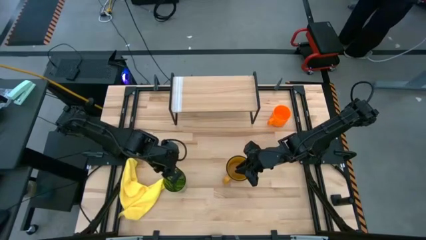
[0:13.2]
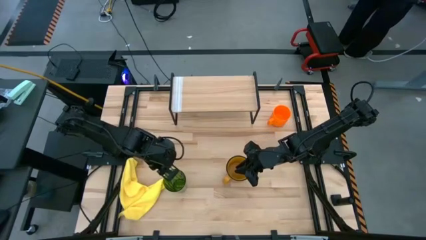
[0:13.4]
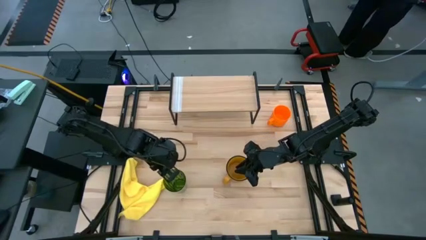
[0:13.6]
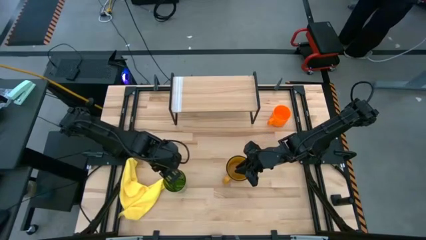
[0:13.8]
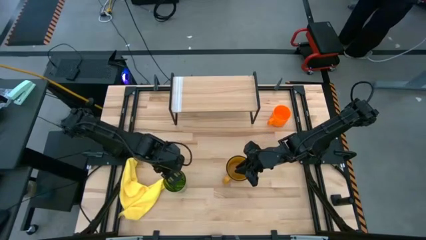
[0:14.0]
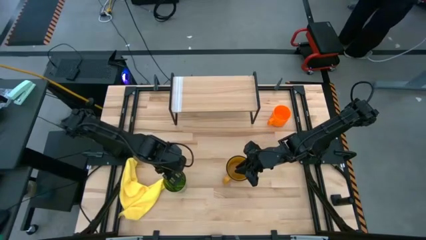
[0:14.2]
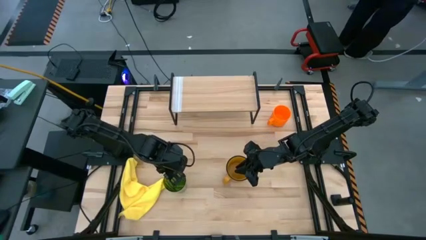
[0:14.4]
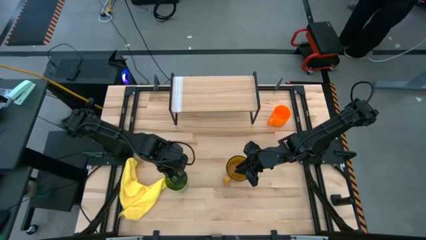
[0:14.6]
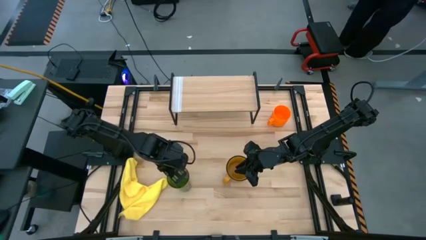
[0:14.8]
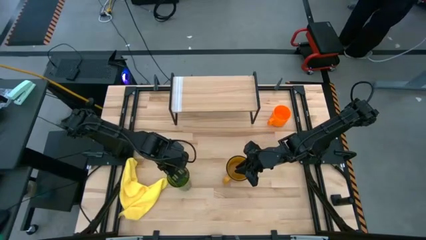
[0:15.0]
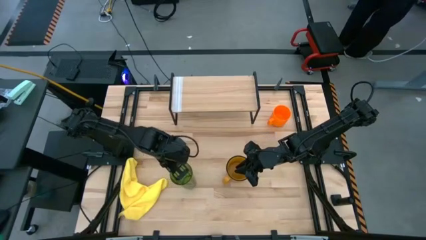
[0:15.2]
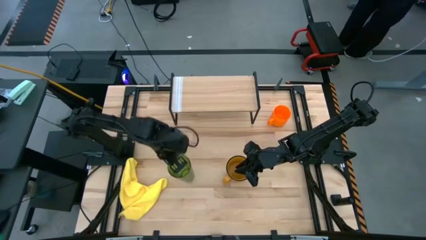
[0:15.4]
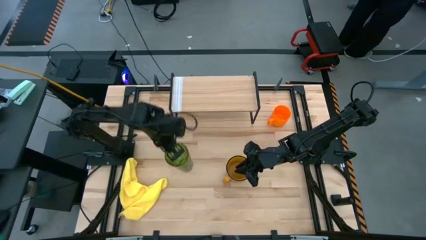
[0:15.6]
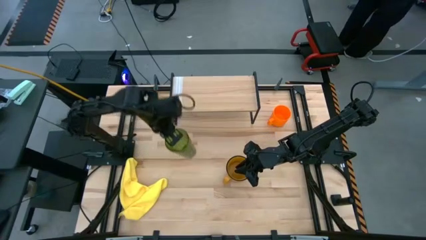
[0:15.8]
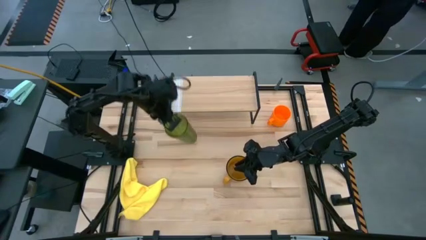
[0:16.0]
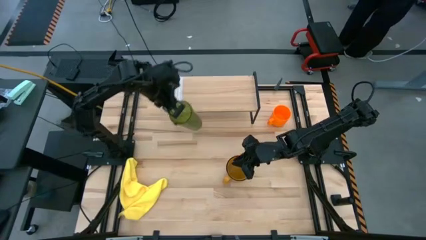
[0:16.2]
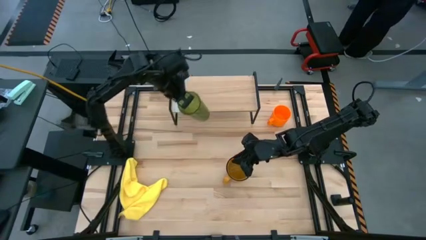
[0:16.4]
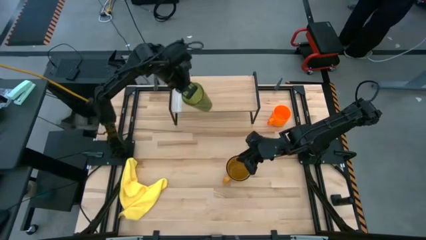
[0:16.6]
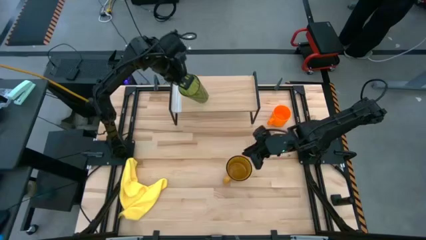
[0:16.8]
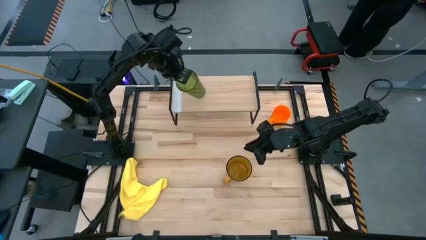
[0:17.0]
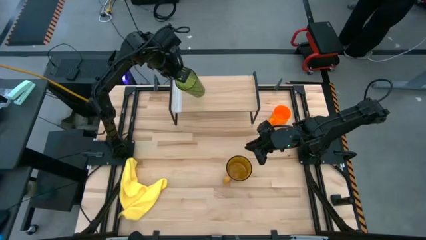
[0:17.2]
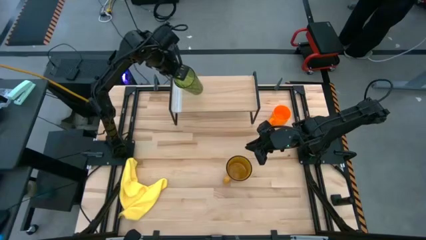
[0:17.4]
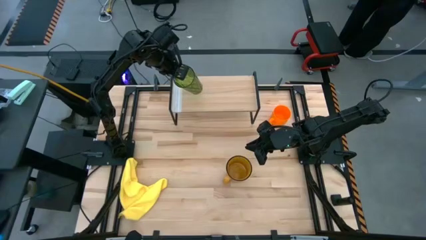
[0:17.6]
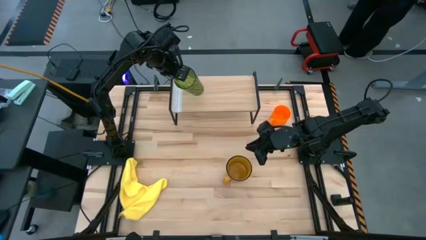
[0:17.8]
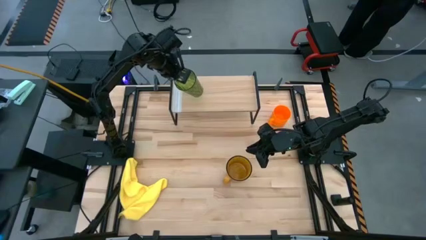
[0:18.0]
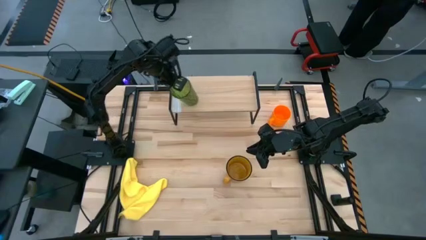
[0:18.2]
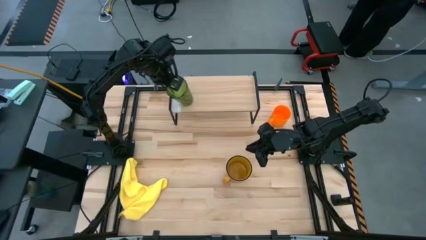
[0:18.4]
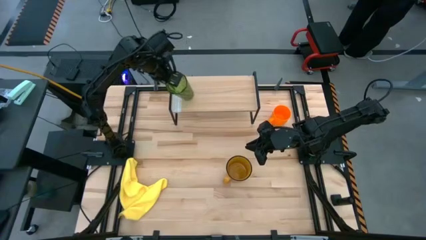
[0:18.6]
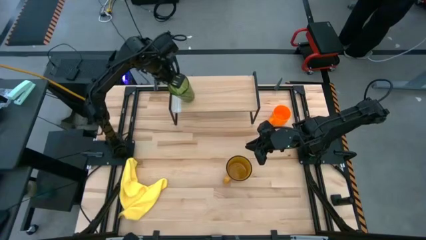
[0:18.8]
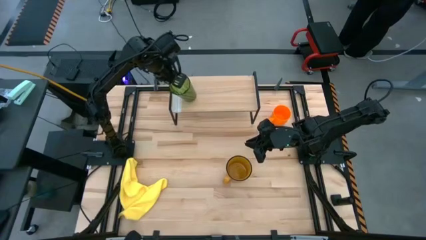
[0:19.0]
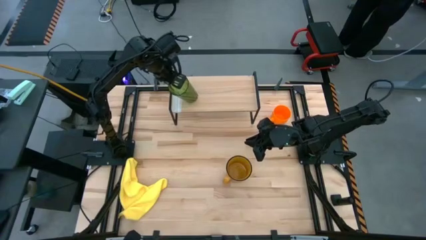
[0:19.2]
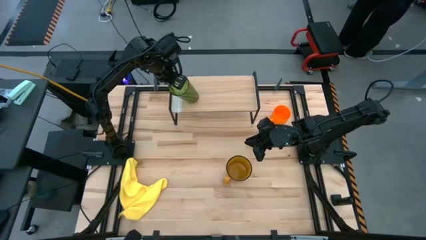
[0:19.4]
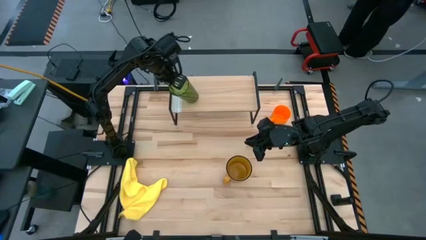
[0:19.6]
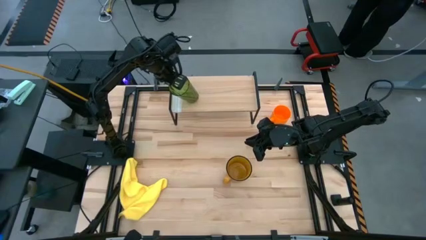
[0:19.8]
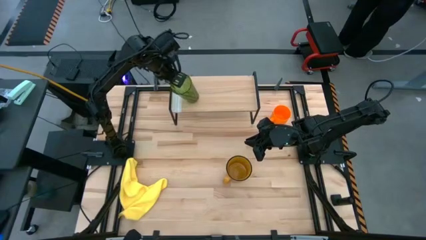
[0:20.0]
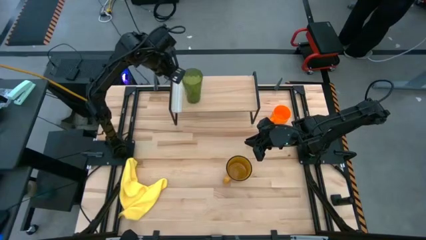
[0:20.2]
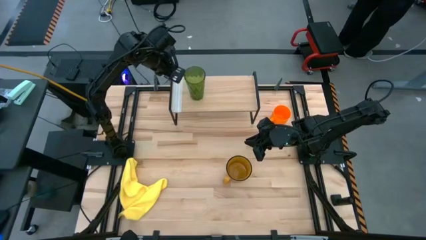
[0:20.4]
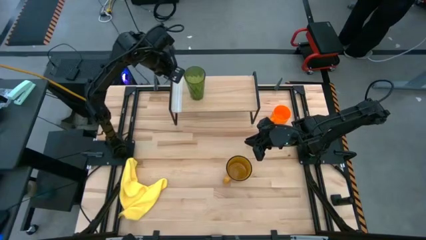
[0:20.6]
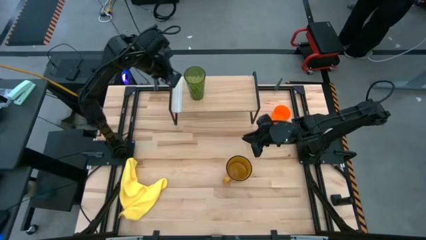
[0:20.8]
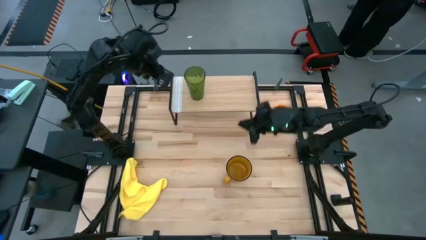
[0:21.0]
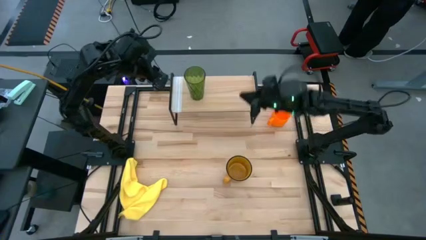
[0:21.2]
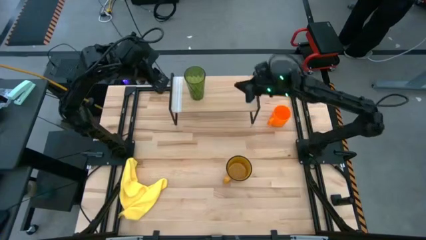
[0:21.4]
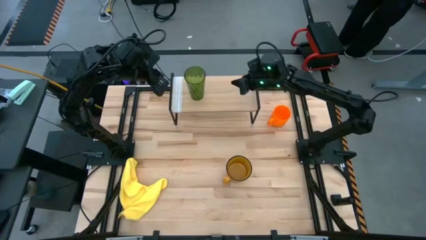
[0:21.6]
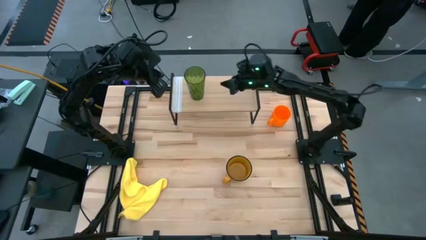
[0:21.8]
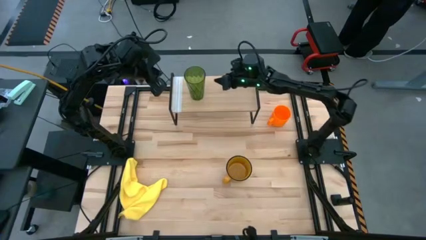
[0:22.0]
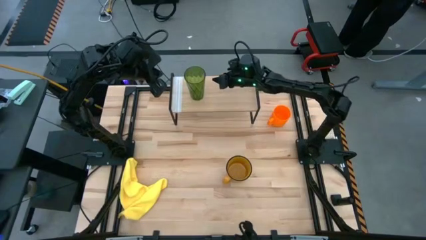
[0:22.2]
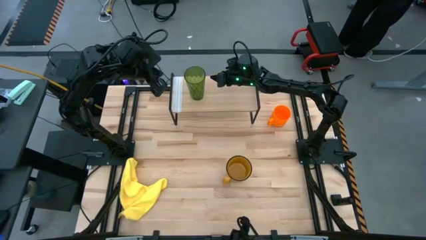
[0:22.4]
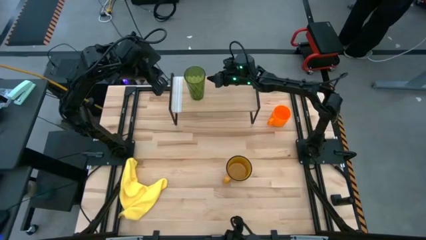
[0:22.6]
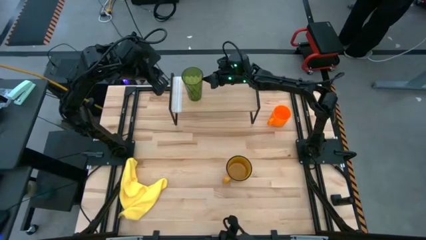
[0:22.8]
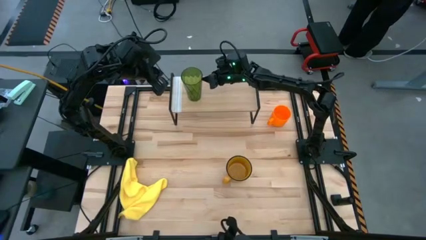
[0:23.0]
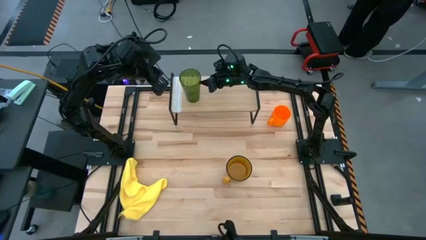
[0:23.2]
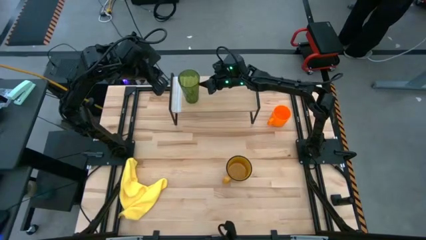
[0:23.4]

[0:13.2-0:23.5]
Task: Stack small to large cups/mugs on shelf
Put the green cup on the shelf
